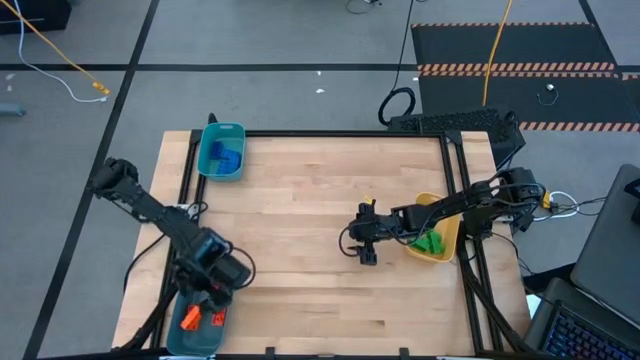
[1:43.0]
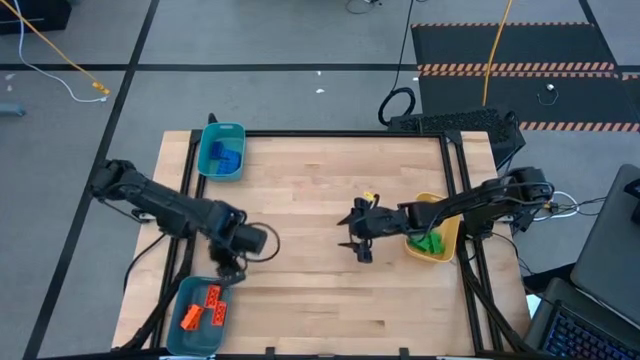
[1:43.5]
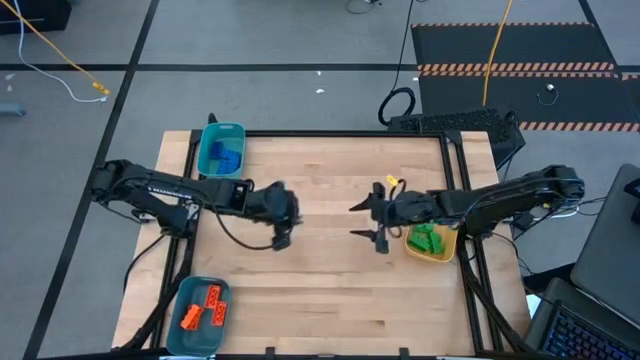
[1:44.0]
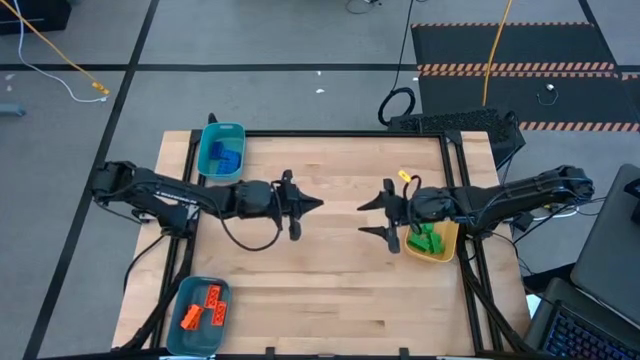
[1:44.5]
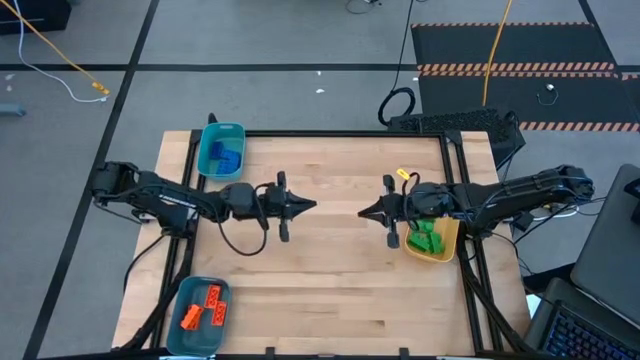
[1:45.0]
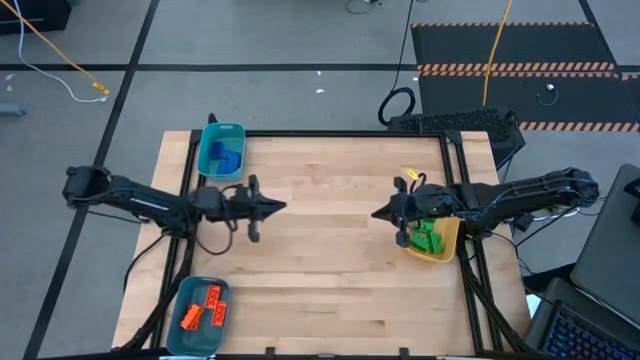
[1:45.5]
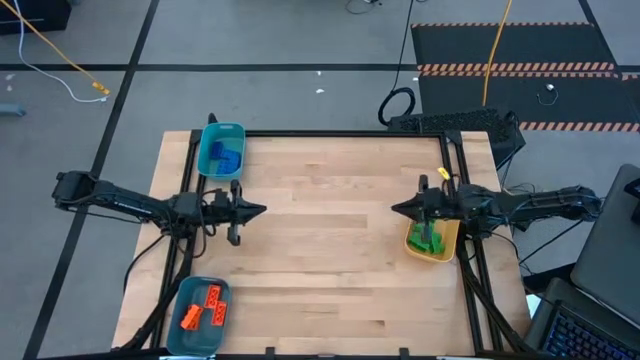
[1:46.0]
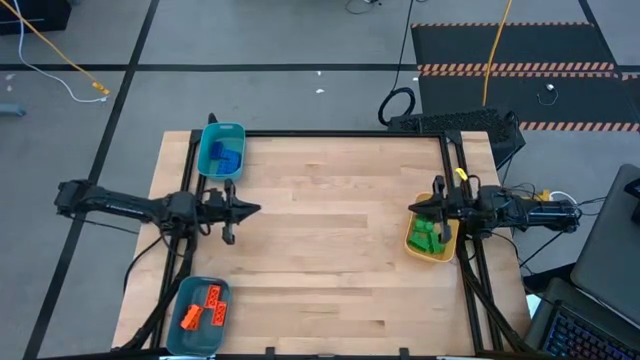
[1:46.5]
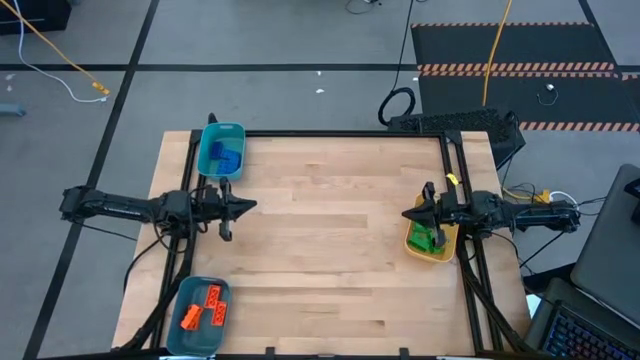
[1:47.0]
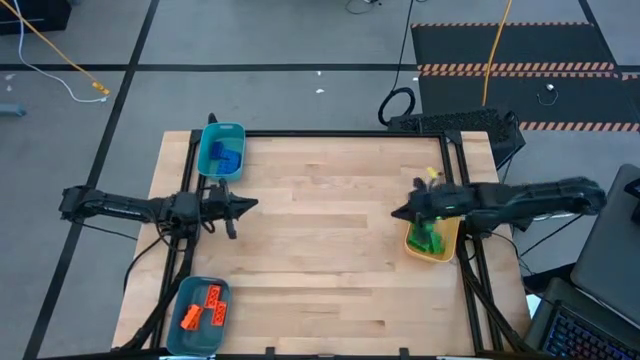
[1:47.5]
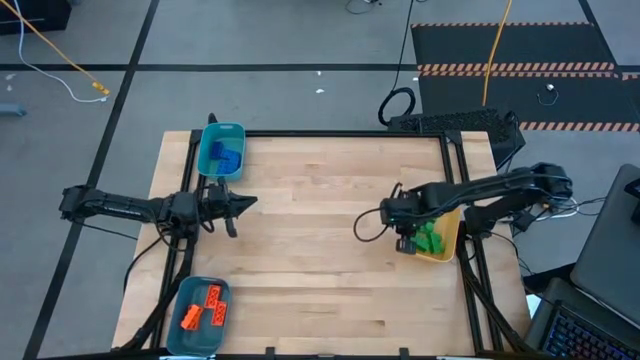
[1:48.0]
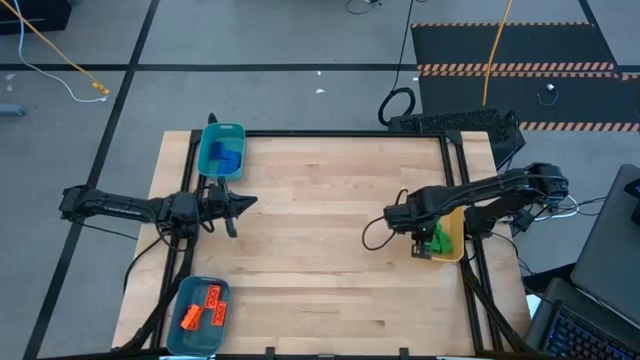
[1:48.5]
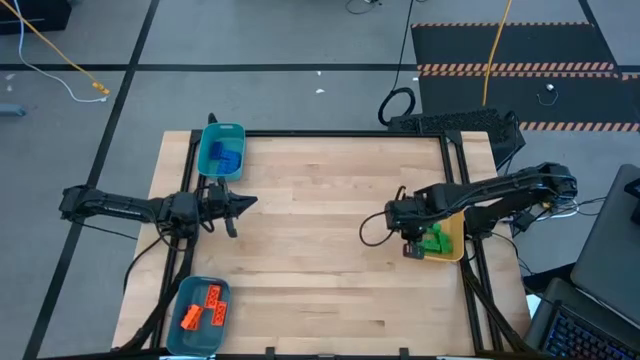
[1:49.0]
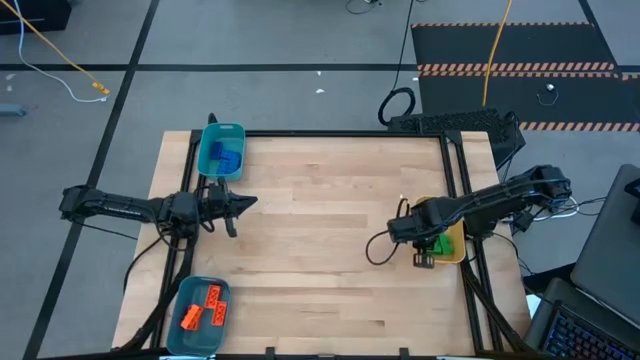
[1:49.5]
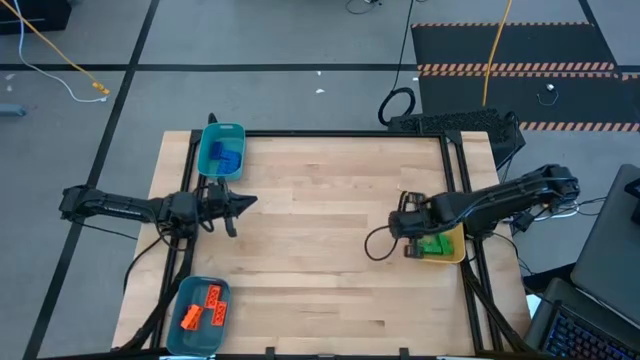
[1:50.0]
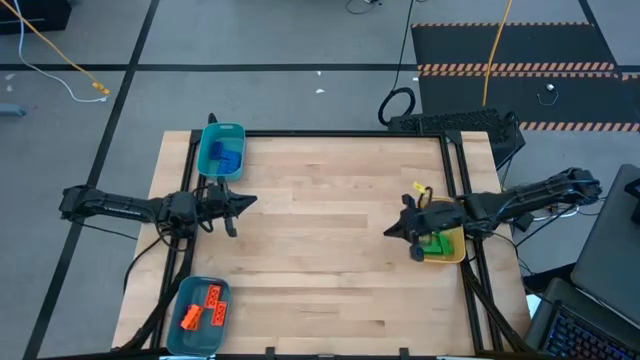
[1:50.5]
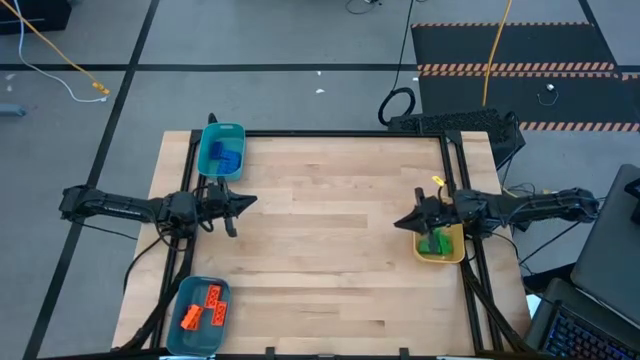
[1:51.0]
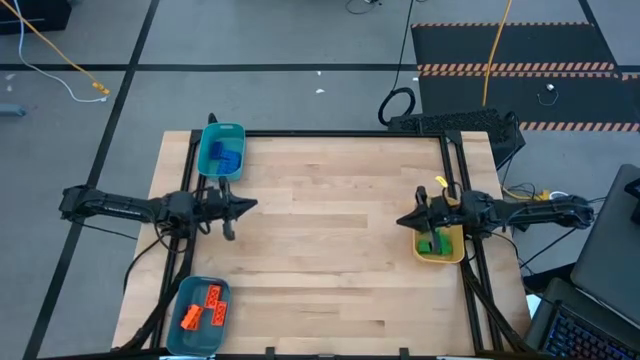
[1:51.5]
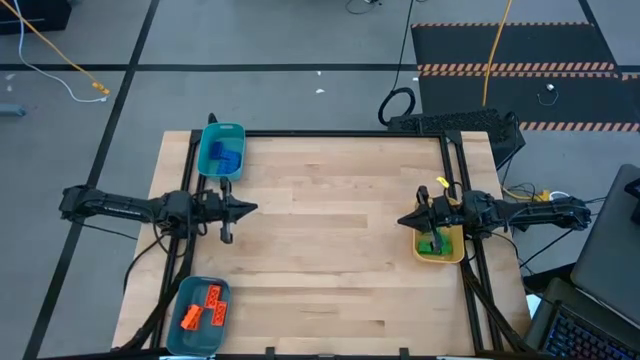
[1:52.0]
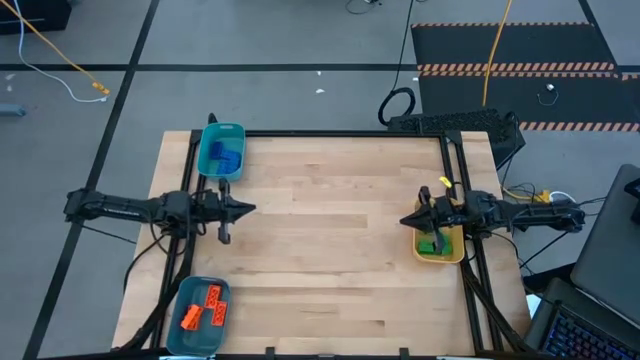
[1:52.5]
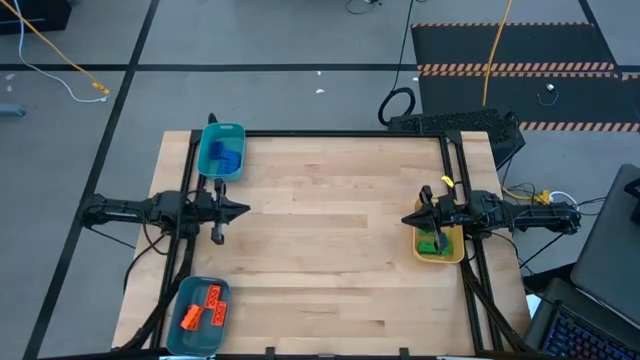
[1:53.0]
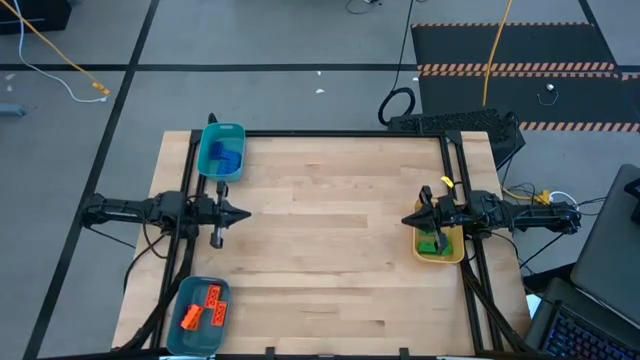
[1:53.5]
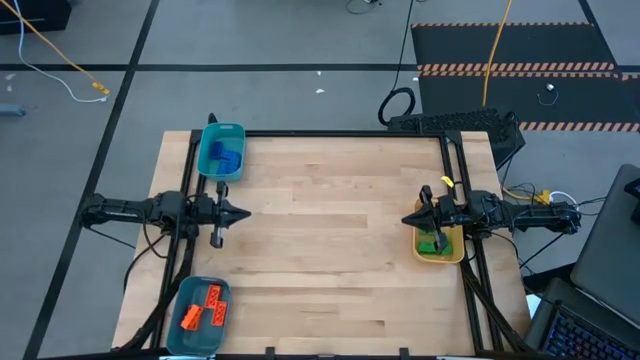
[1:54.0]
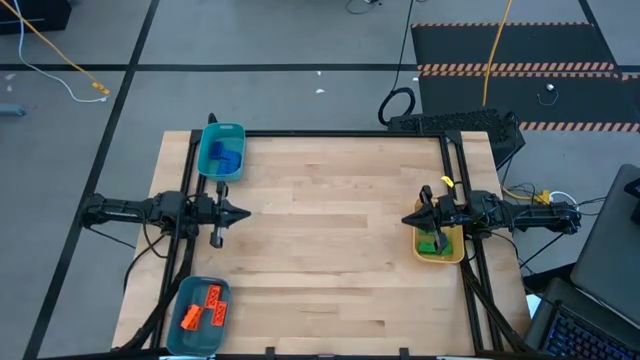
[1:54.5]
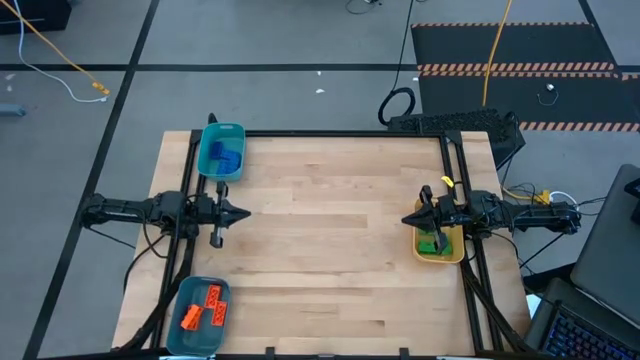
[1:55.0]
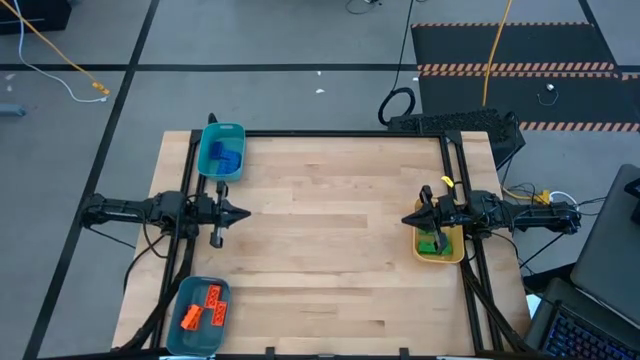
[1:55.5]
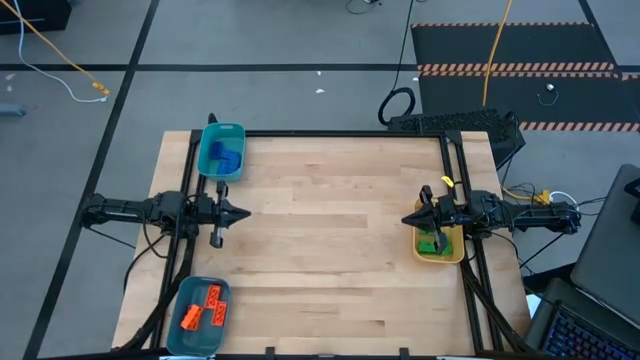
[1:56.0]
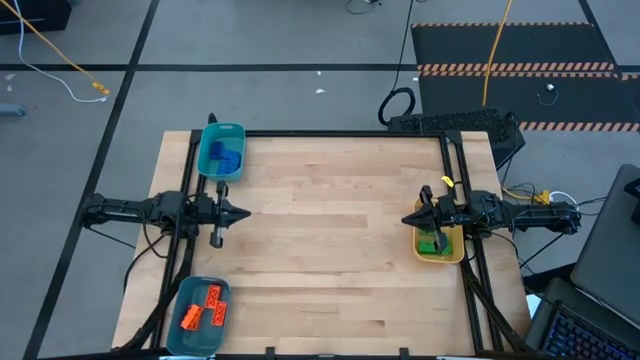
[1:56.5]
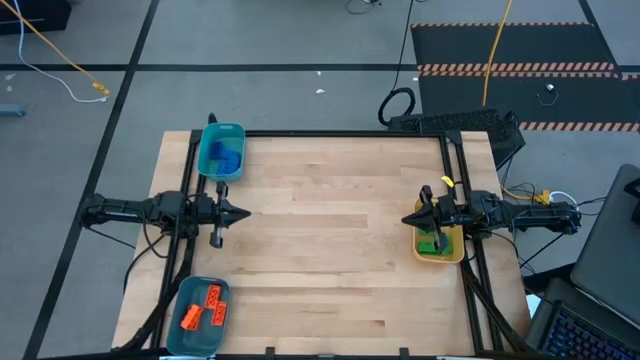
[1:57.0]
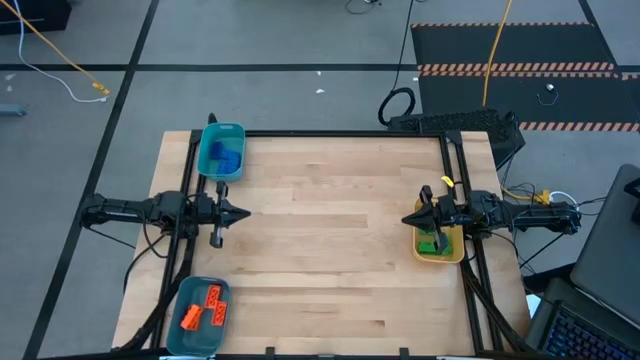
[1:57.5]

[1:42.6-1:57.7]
Task: Sort & place blocks by color
Return to Home Position

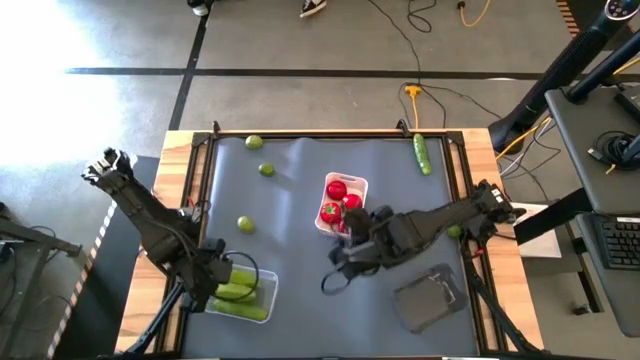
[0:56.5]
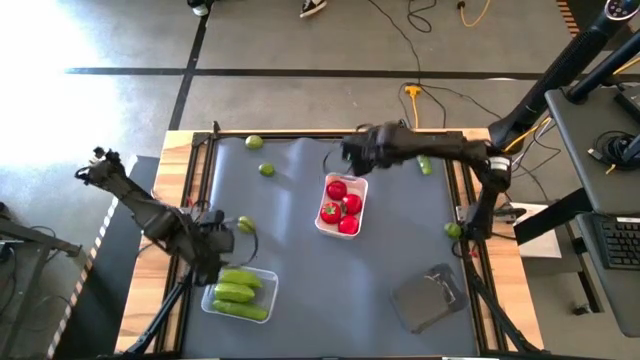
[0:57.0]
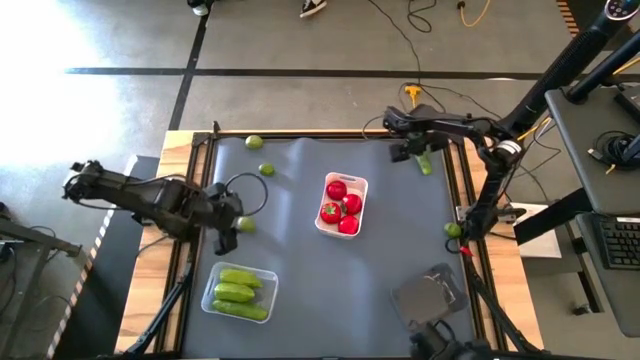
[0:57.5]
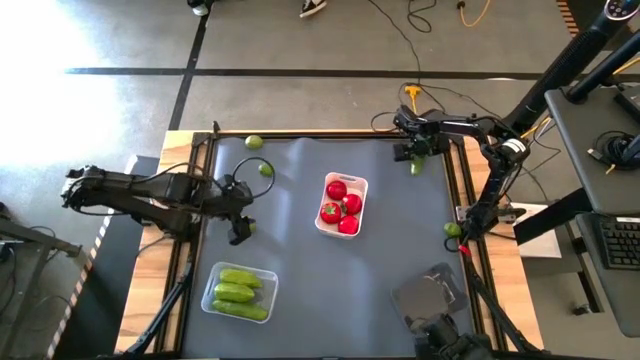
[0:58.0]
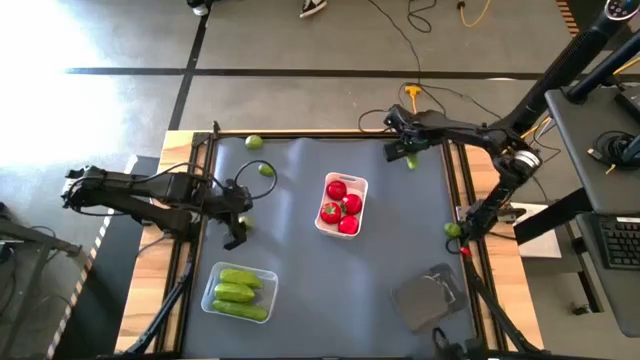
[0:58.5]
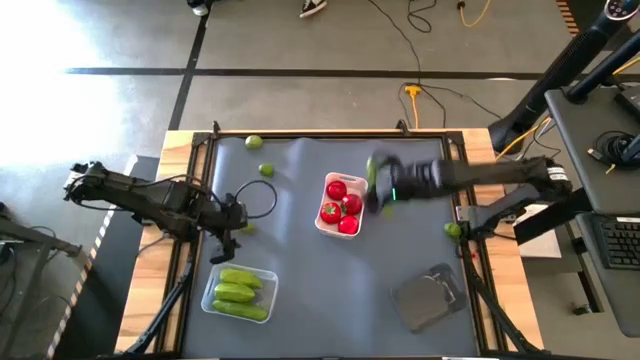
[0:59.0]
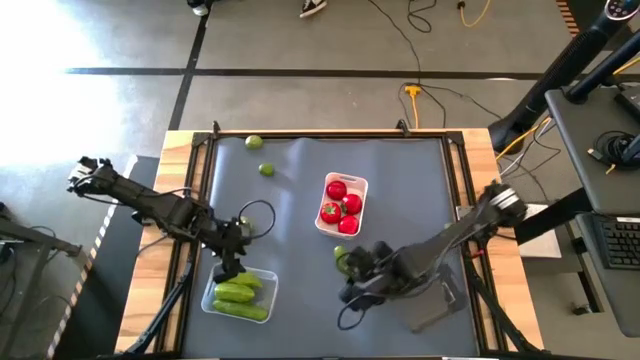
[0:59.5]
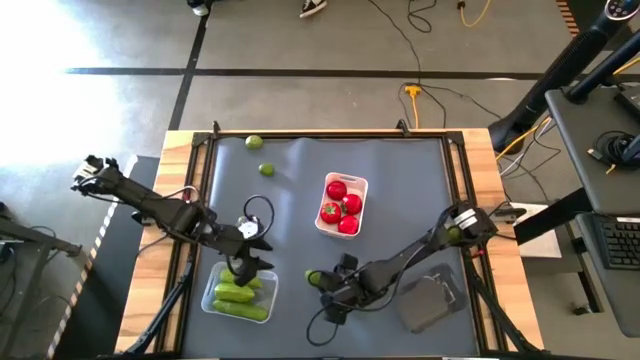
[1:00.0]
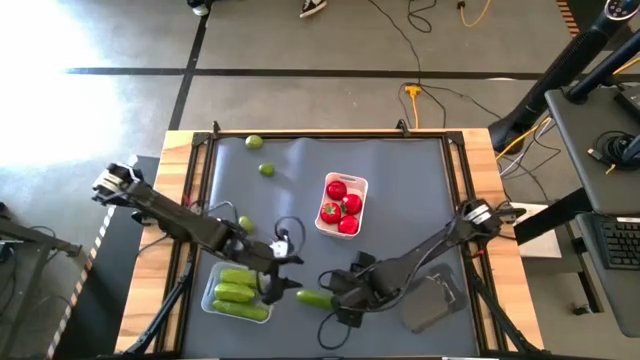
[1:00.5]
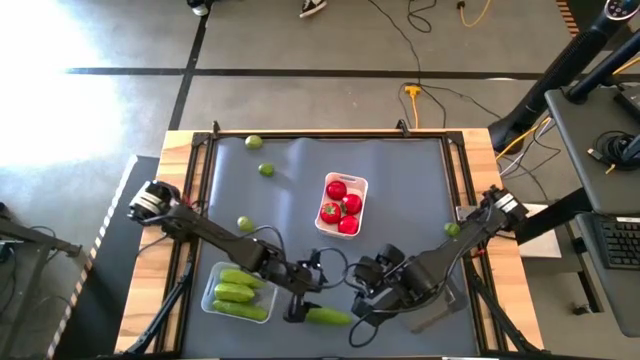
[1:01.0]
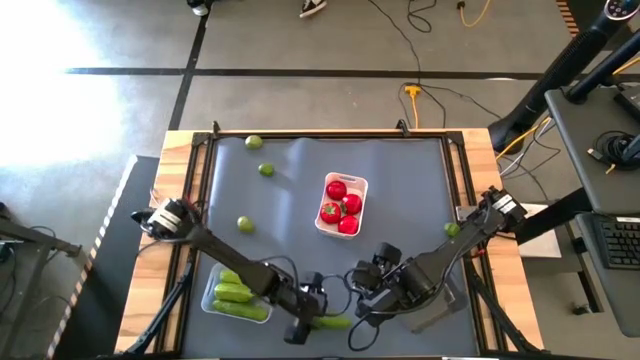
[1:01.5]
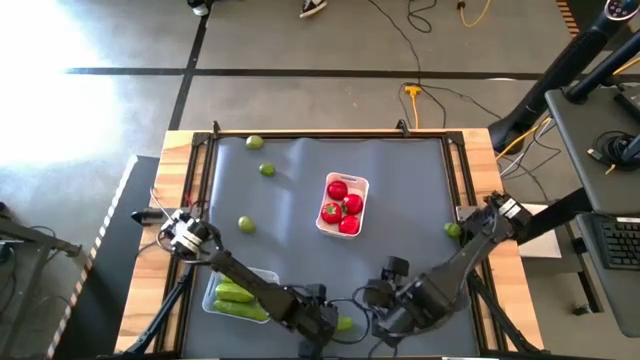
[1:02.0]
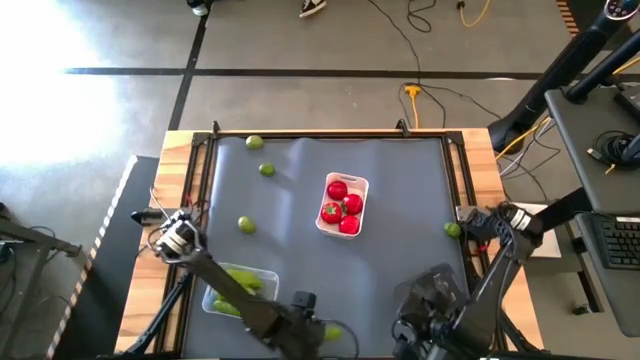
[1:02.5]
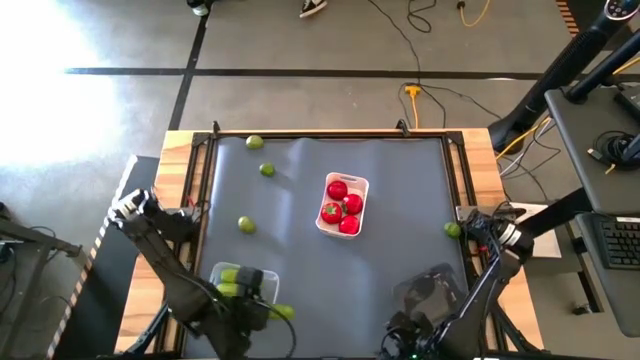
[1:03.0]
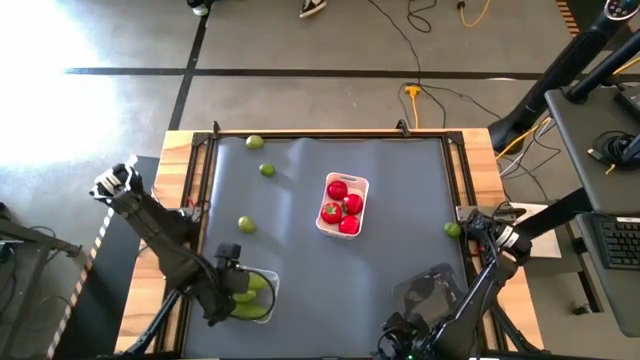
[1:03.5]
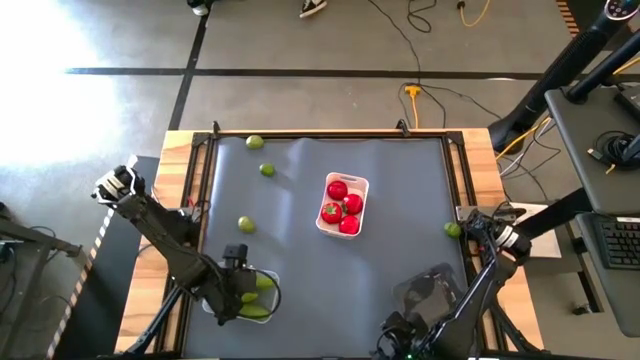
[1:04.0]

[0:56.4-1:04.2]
Task: Sort produce into baskets
Put the cucumber into the transparent bin
